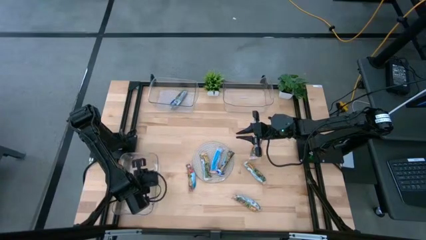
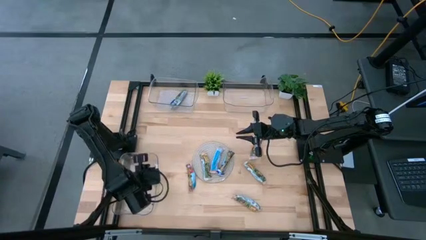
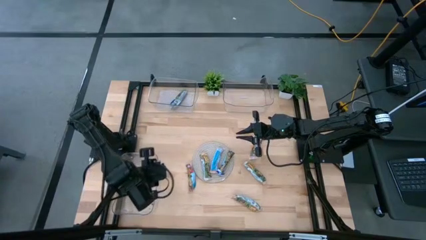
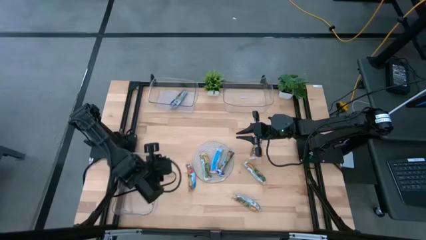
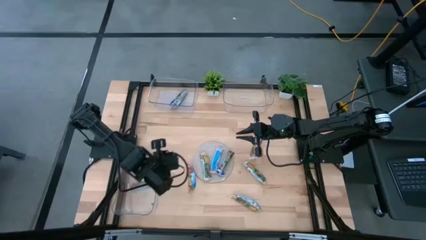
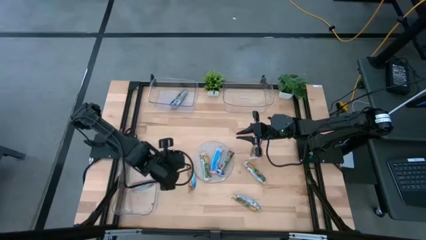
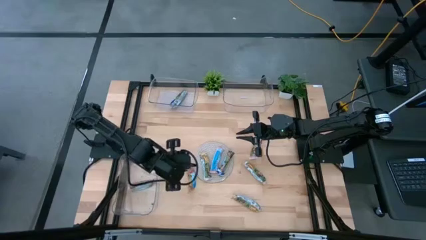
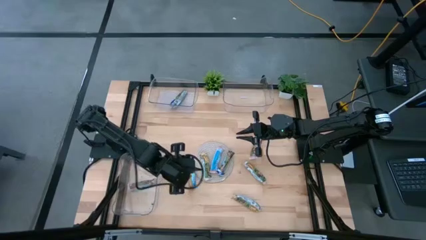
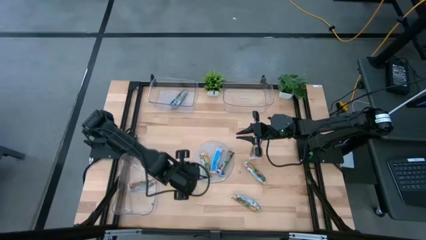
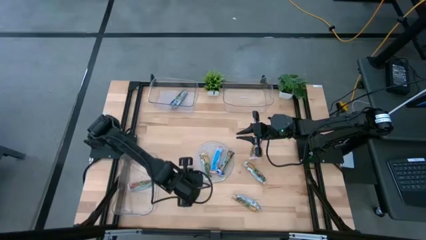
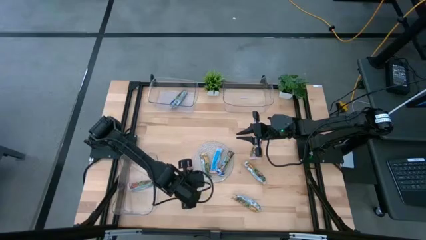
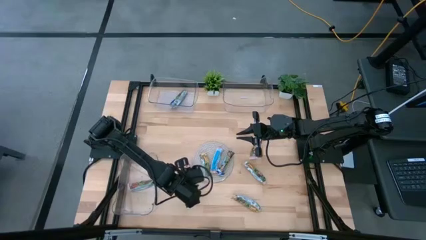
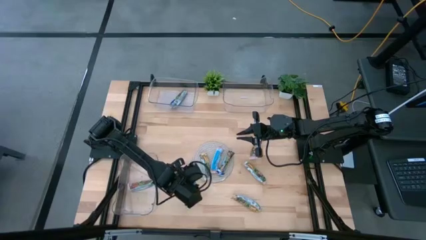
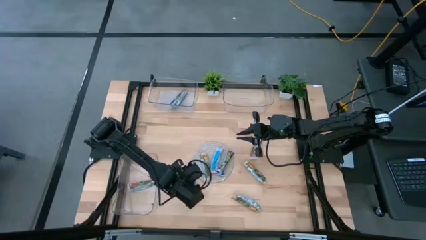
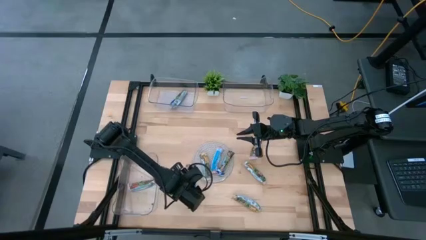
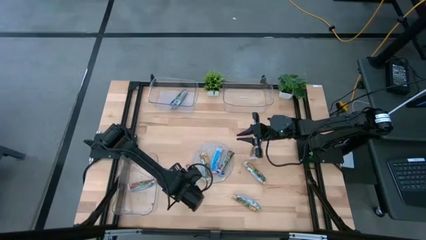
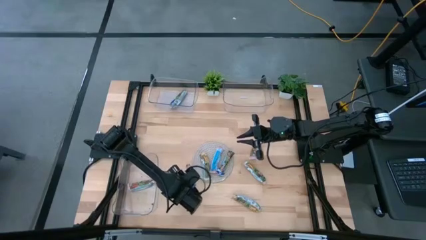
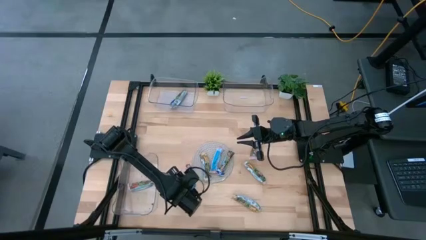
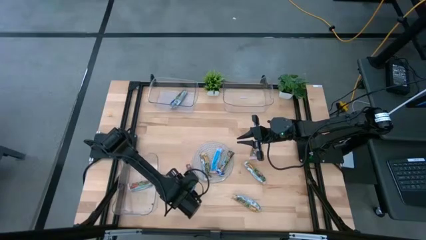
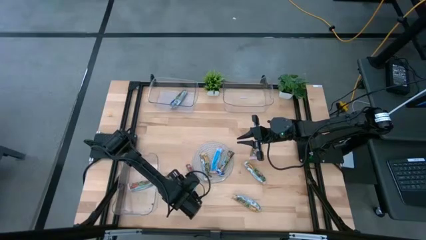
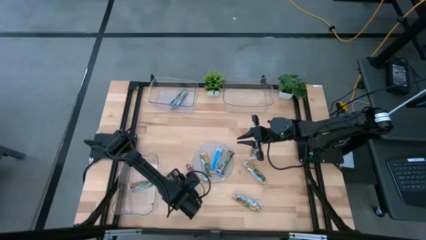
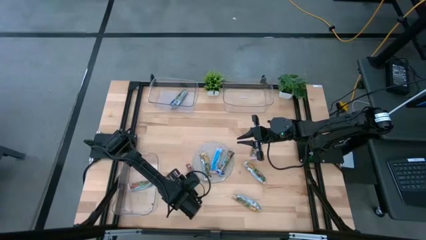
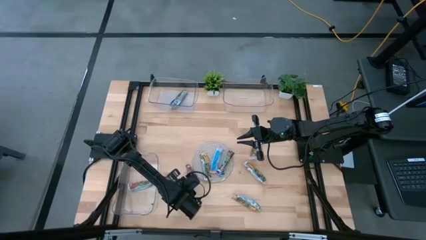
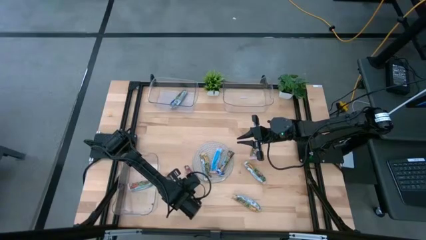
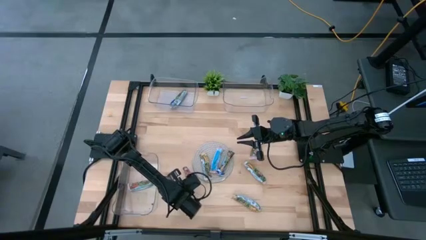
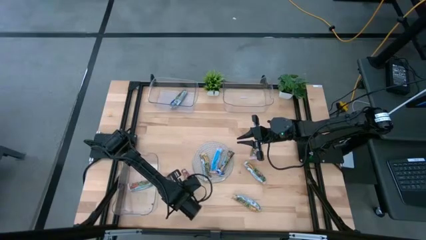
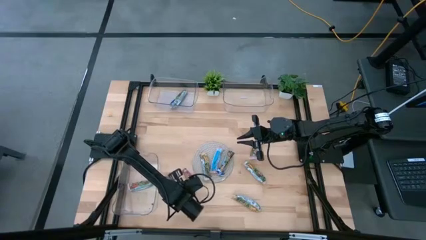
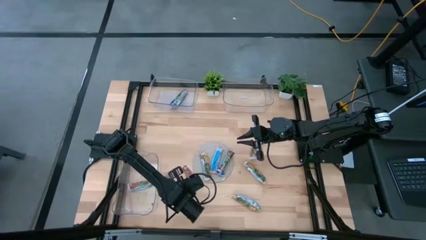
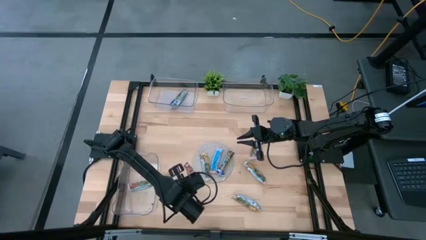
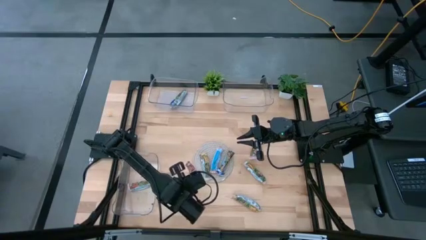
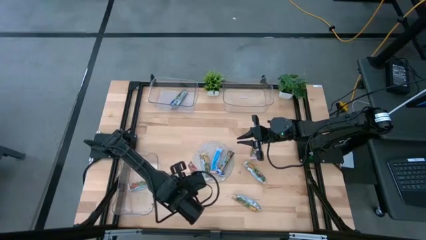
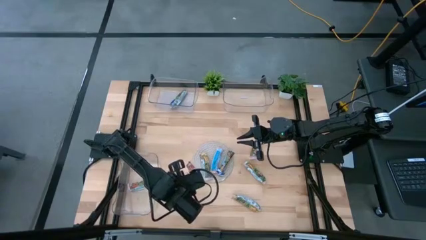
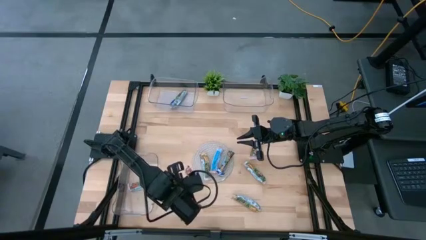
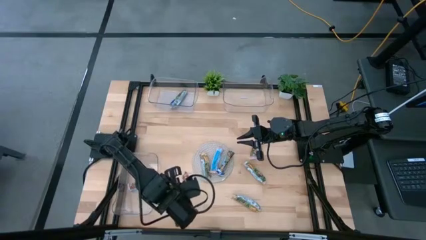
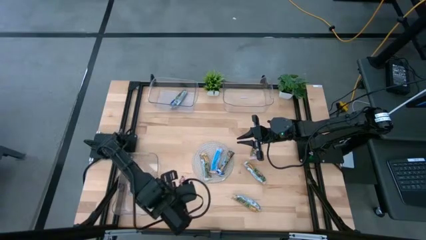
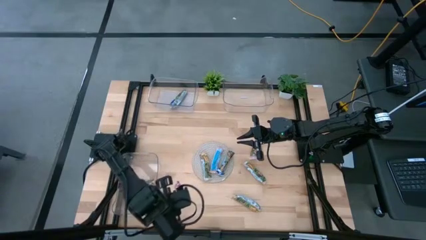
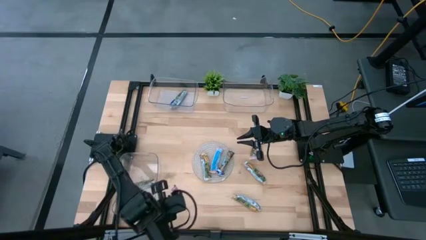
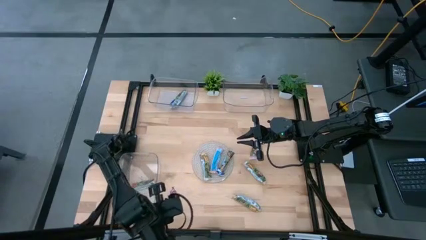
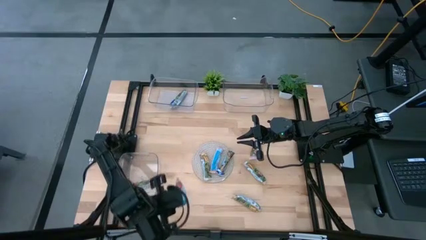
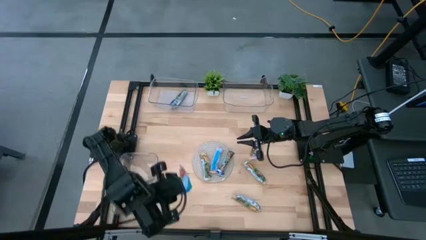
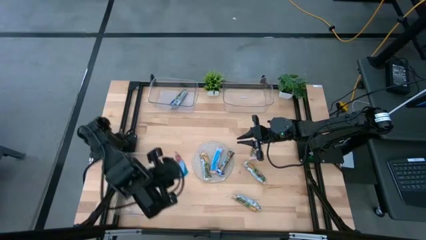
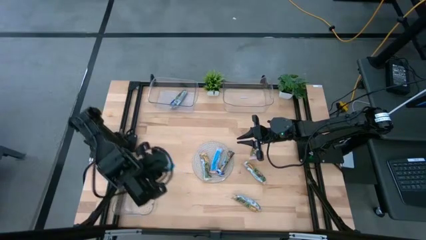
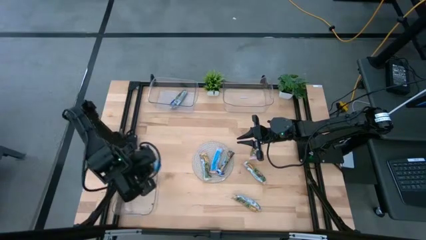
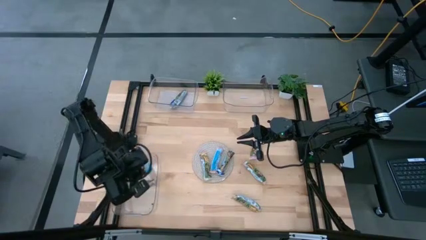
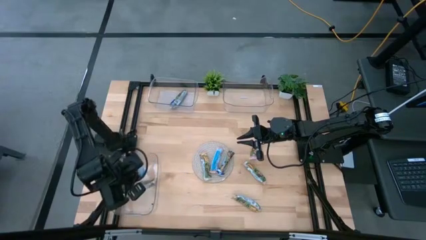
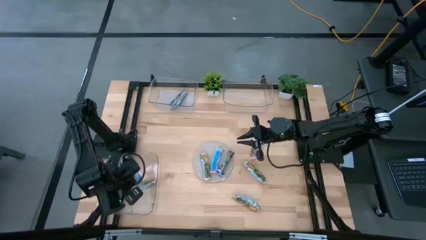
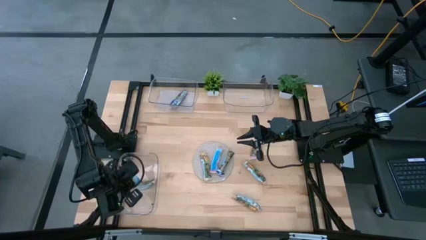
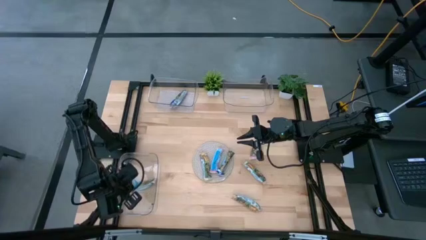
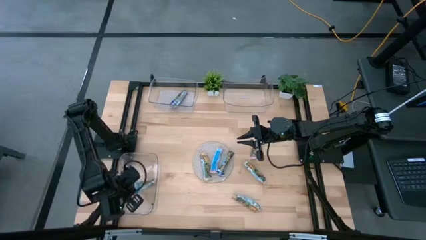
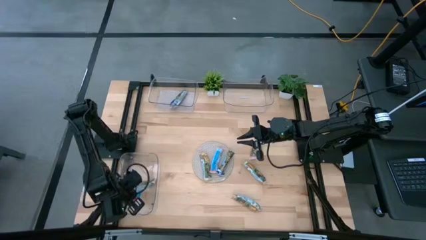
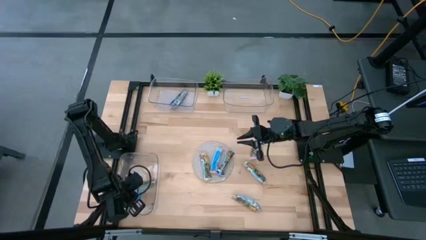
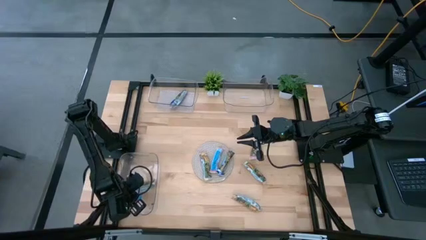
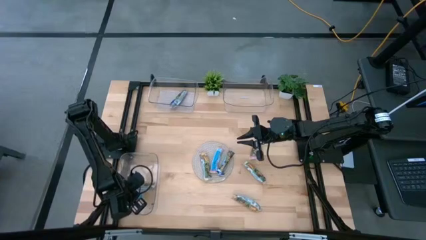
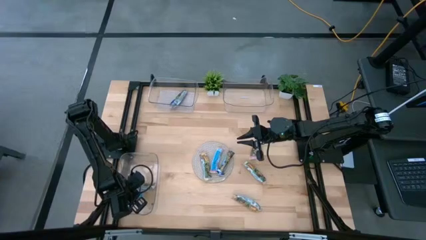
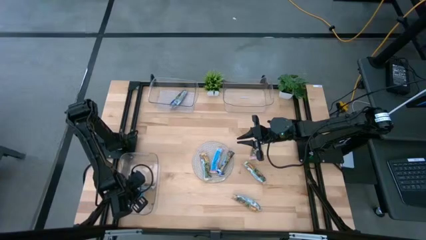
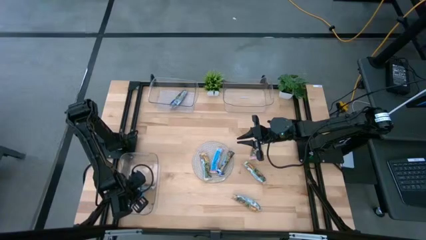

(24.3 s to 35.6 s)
Task: Pick and place Granola Bars by type
Put the red granola bar into the bottom transparent bin
